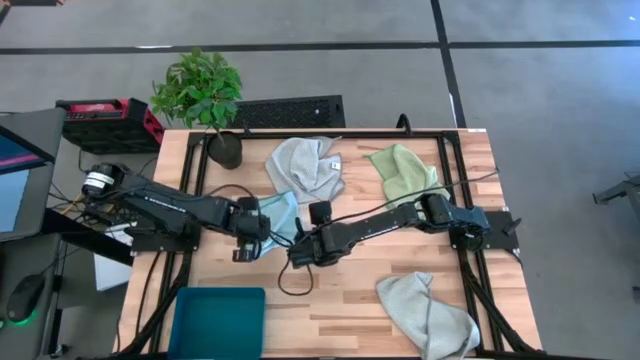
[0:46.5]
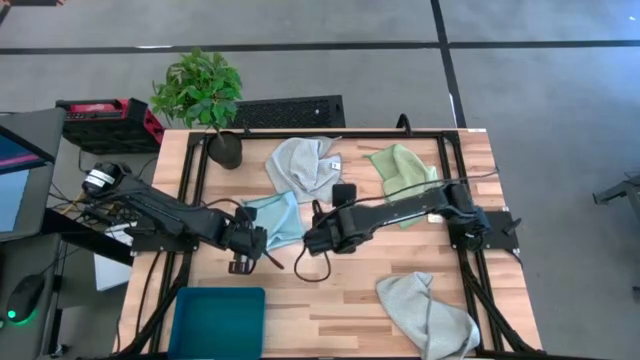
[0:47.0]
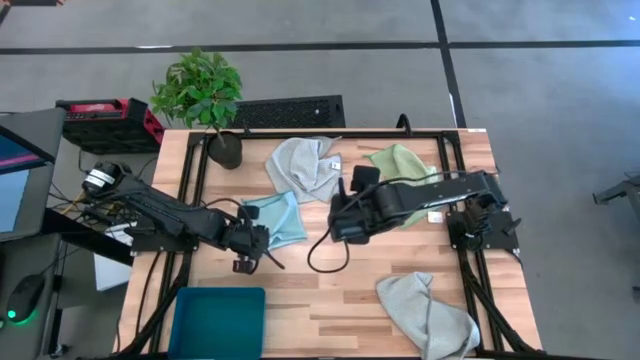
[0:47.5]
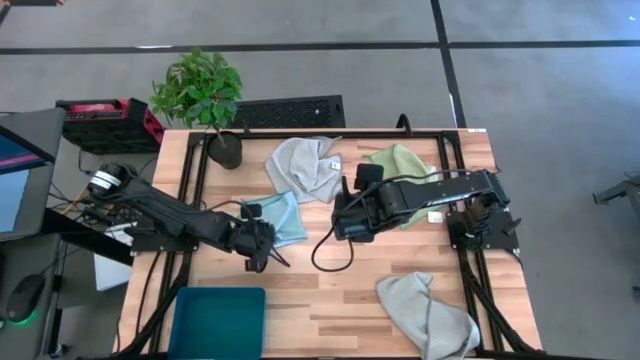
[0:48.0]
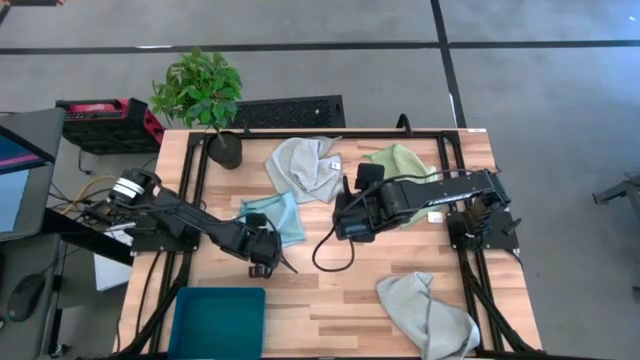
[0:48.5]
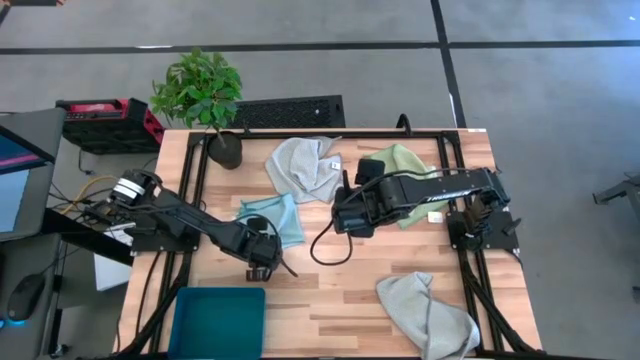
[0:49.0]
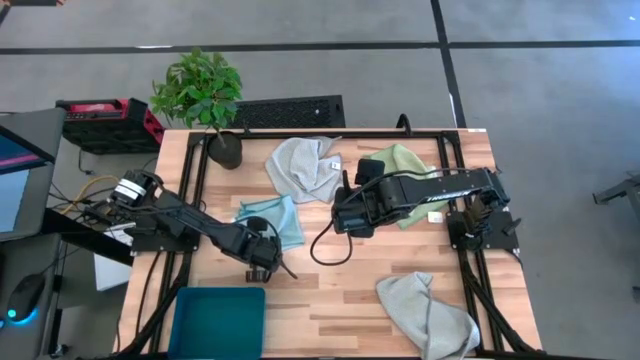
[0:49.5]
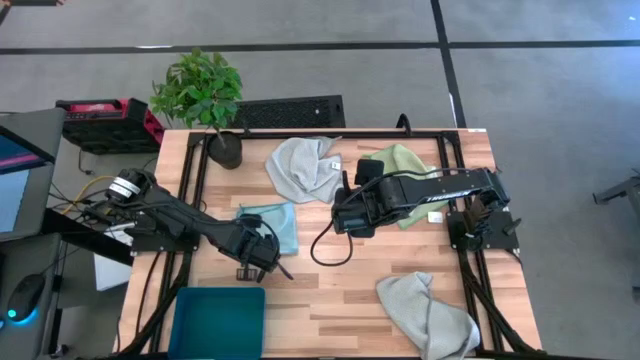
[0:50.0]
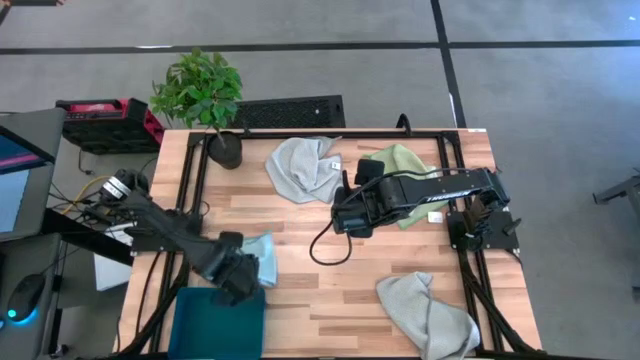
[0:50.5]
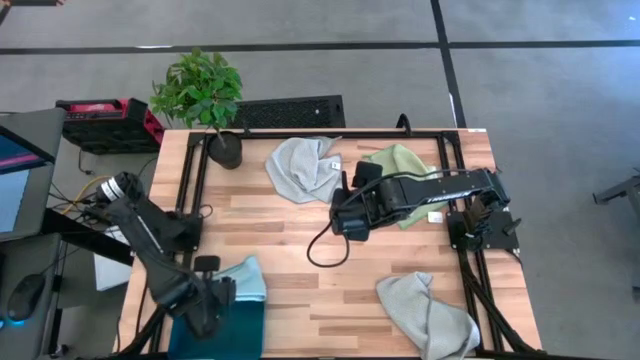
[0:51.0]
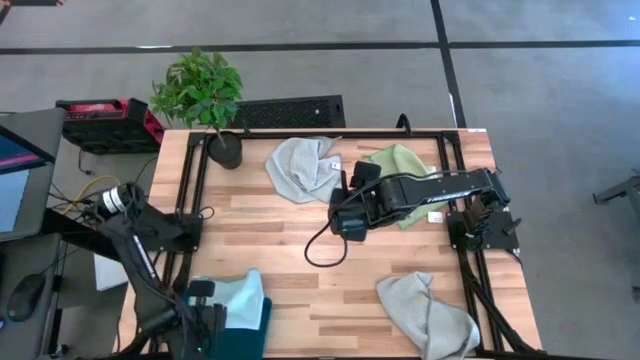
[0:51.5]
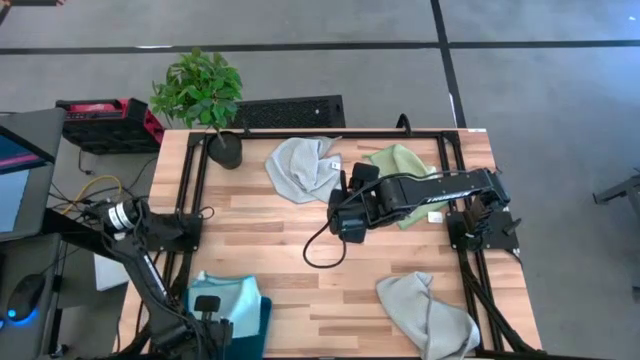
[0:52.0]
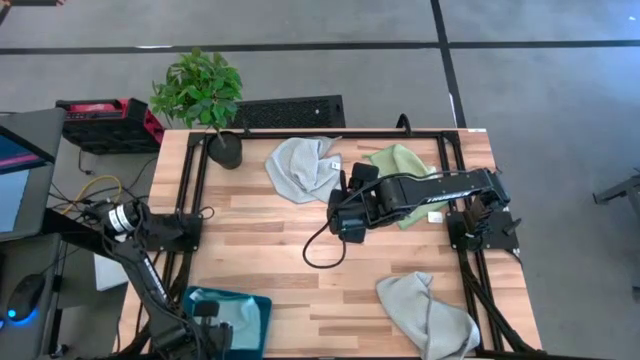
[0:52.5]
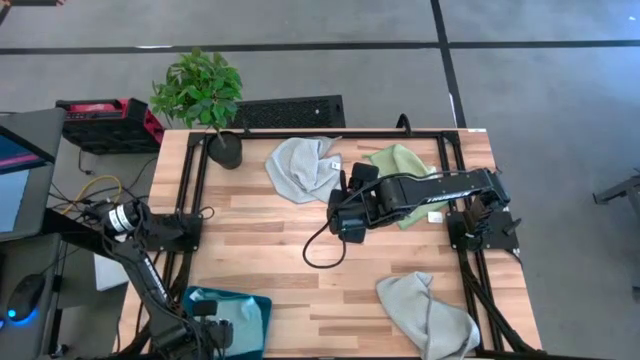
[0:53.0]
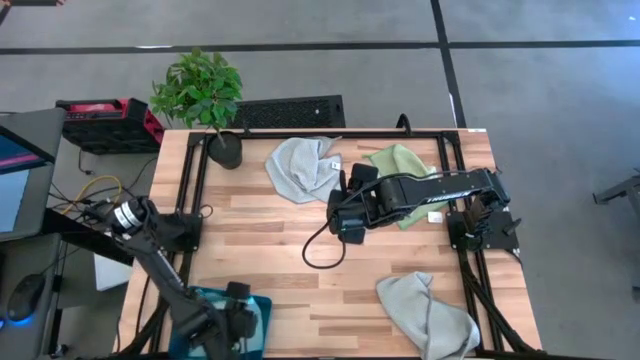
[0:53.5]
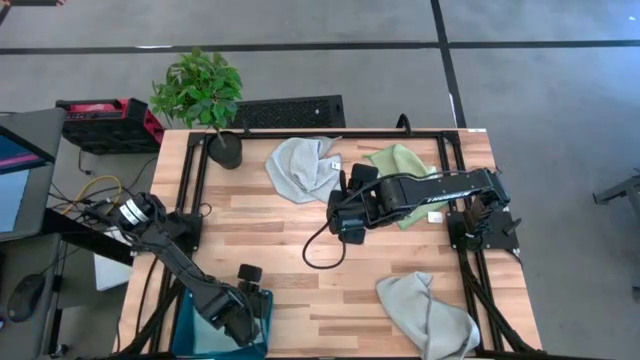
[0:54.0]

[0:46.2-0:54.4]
Task: Fold microfiber towels
Put the blue microfiber cloth into the blue bin

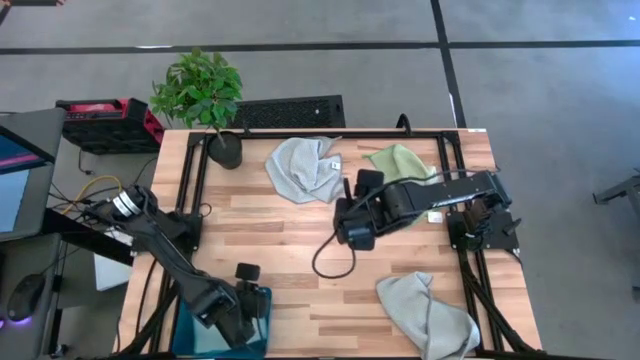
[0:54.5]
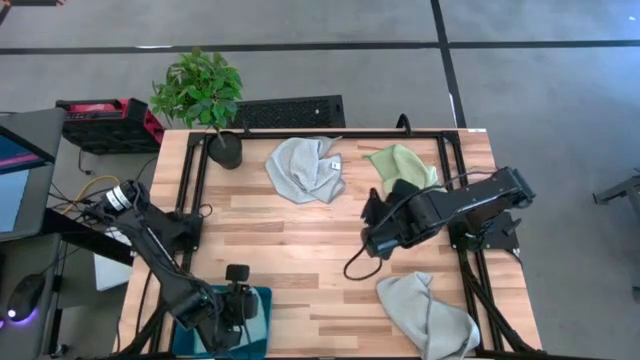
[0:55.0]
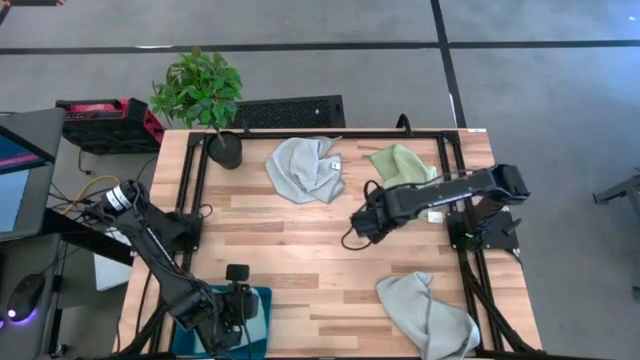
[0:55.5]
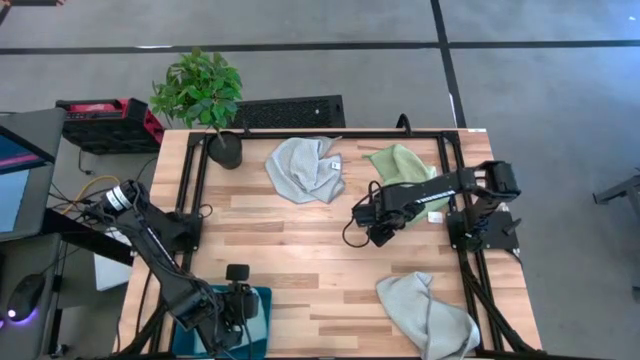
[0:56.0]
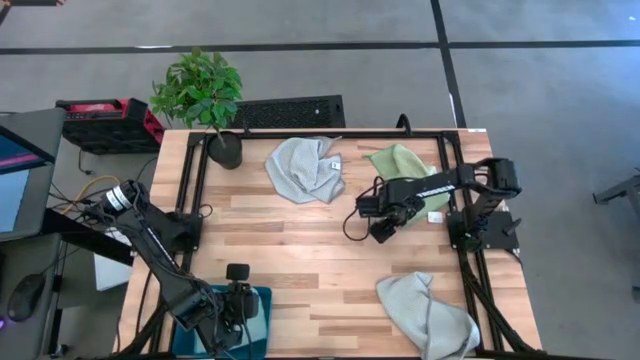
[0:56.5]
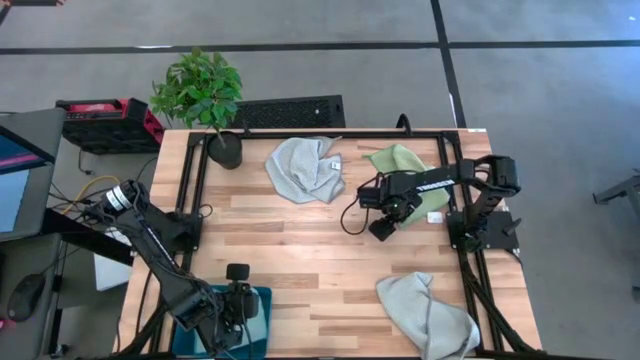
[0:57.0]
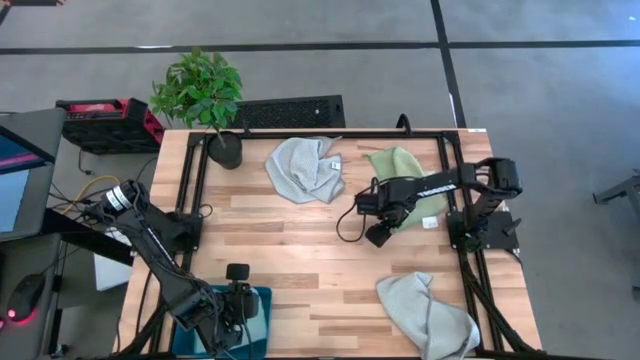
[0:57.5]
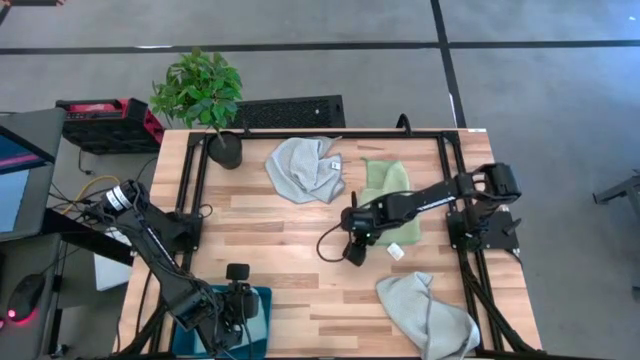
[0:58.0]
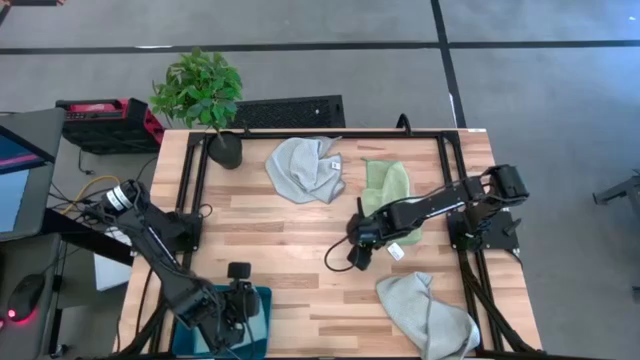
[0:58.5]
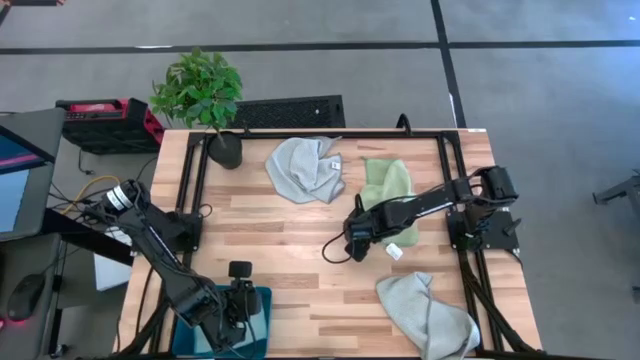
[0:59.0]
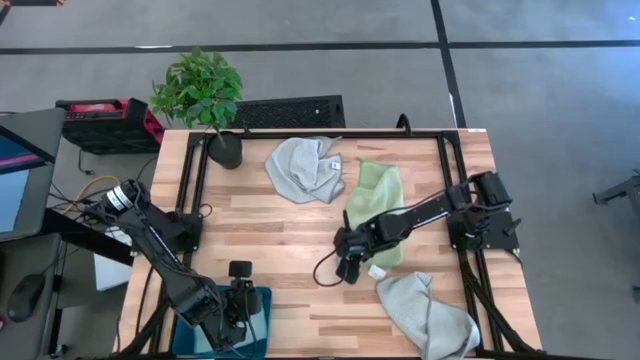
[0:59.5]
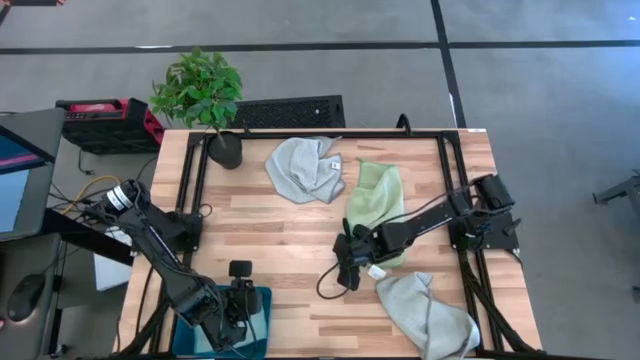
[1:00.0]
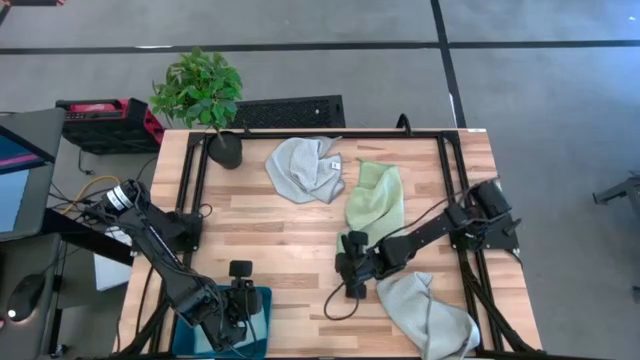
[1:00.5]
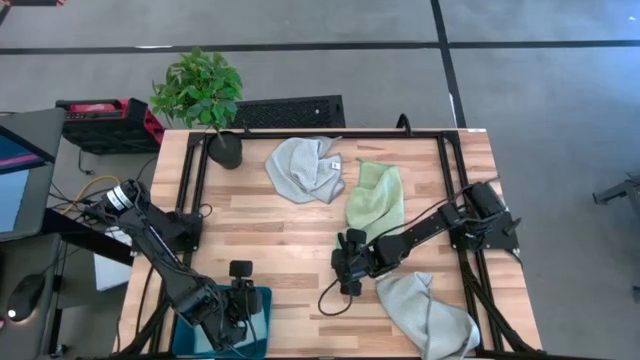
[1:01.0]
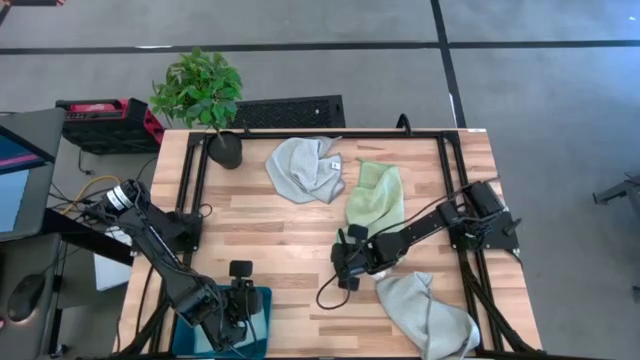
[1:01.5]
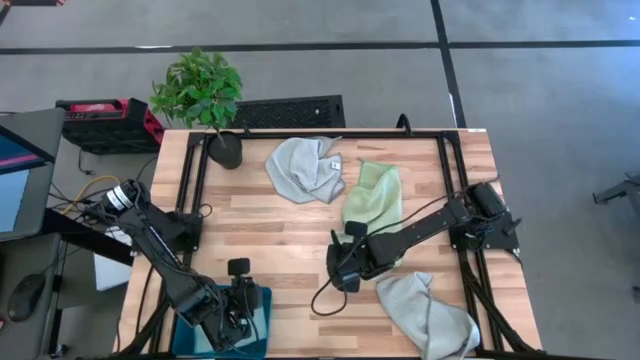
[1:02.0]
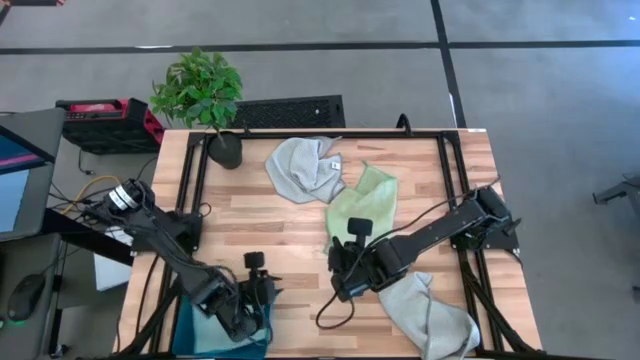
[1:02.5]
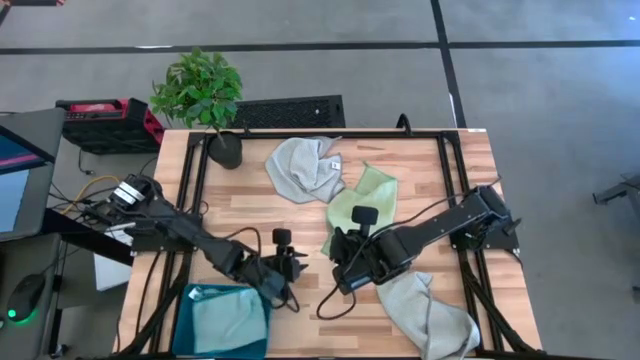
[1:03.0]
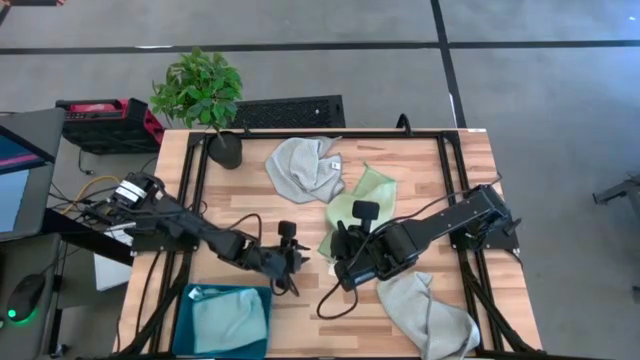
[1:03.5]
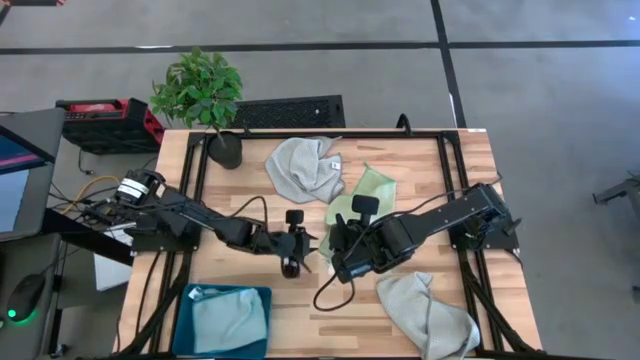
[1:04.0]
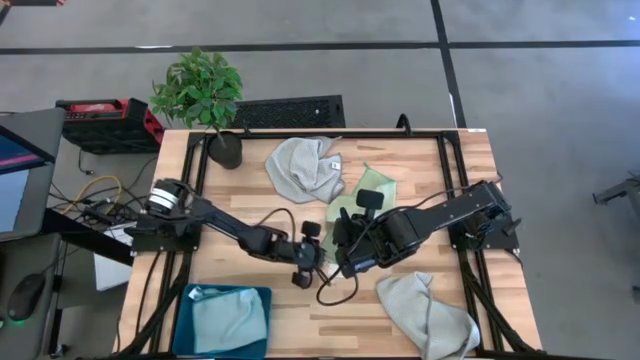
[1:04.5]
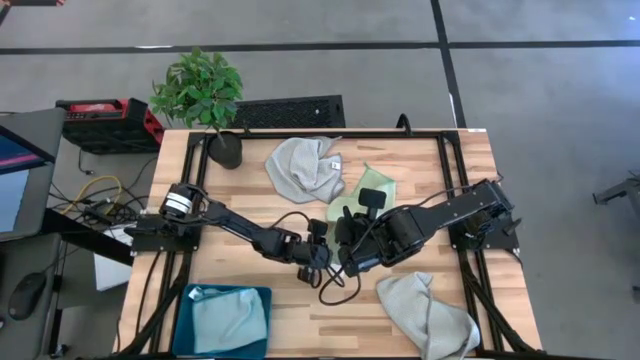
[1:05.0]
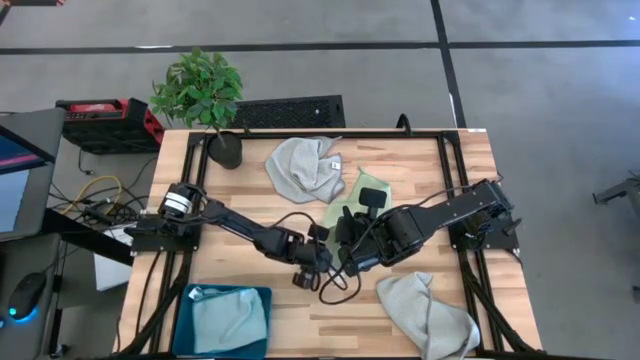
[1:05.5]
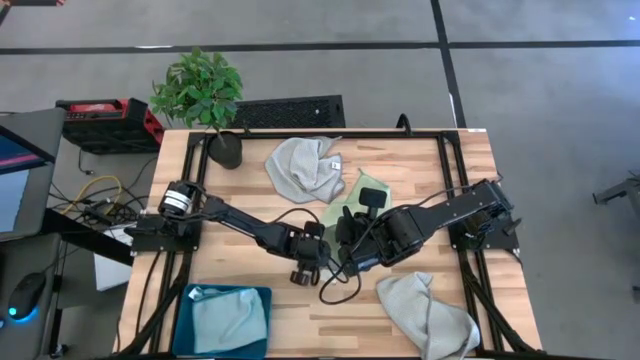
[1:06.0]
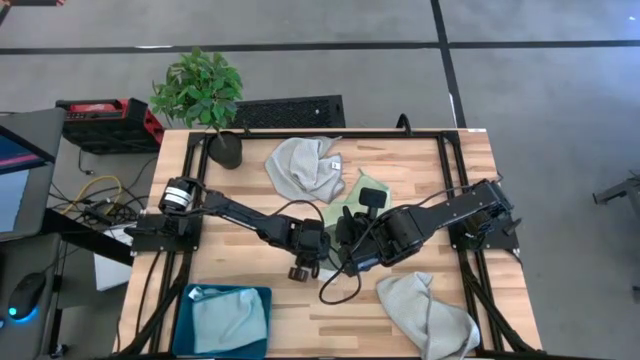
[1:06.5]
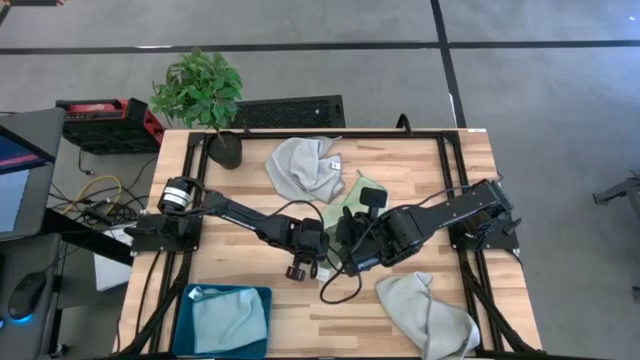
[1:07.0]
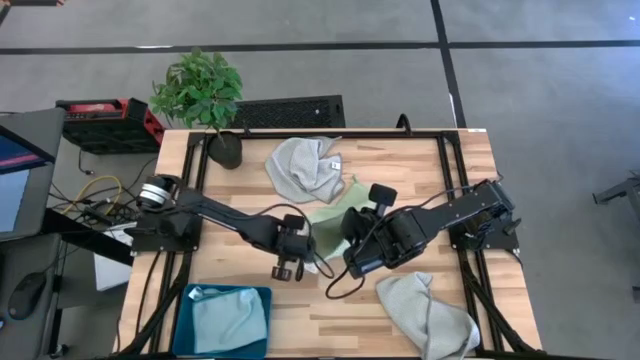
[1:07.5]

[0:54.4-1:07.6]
Fold the green microfiber cloth
